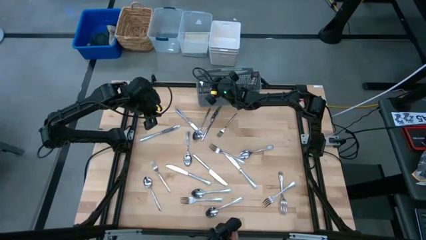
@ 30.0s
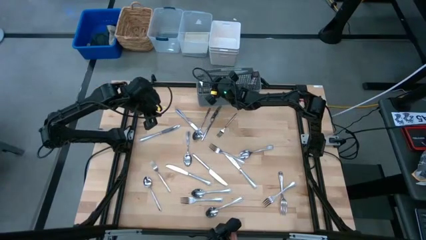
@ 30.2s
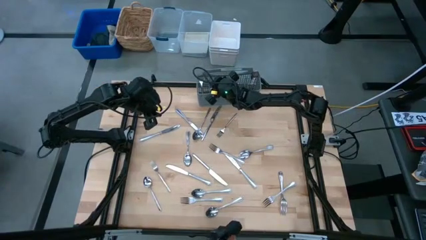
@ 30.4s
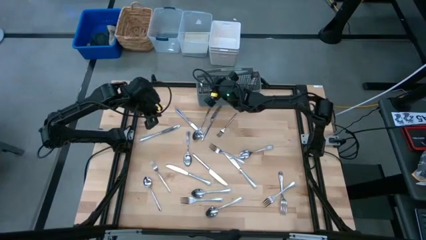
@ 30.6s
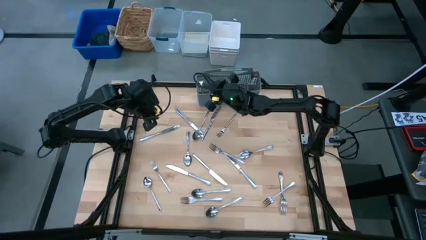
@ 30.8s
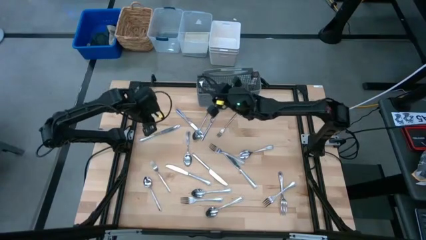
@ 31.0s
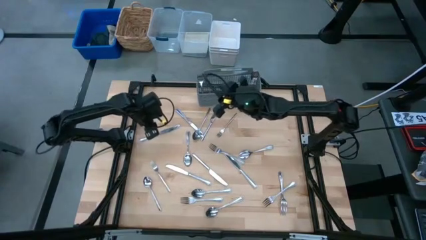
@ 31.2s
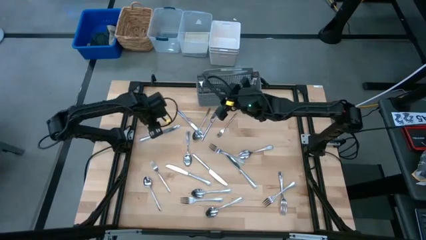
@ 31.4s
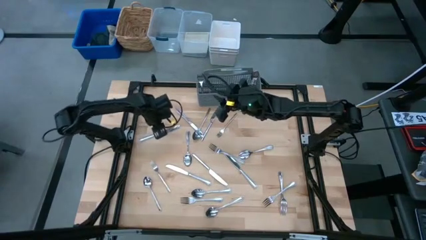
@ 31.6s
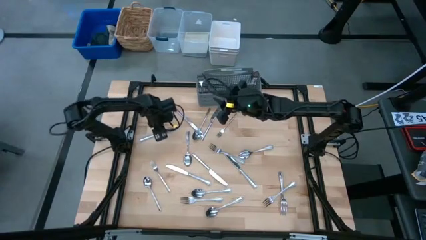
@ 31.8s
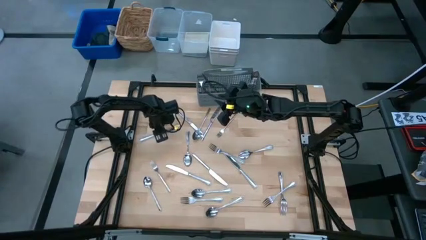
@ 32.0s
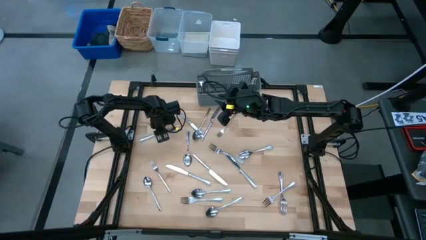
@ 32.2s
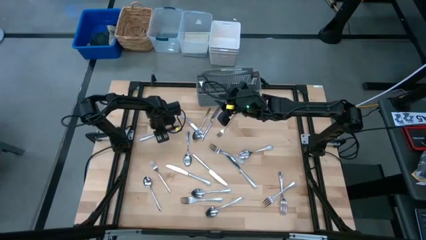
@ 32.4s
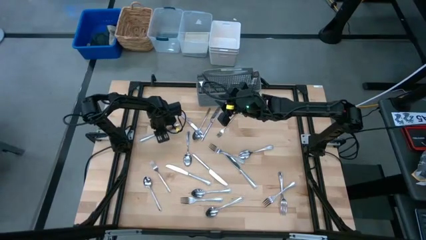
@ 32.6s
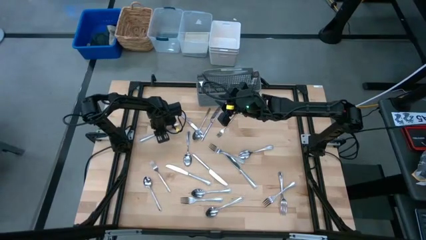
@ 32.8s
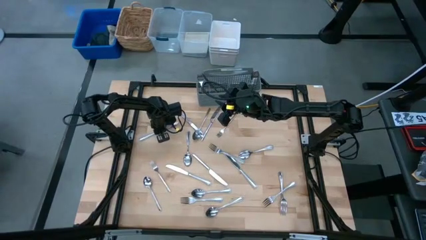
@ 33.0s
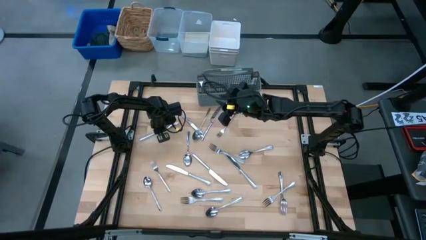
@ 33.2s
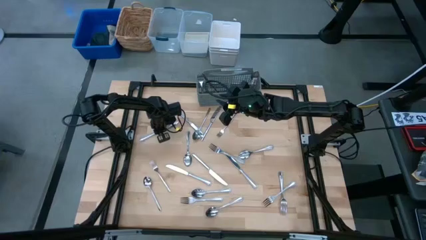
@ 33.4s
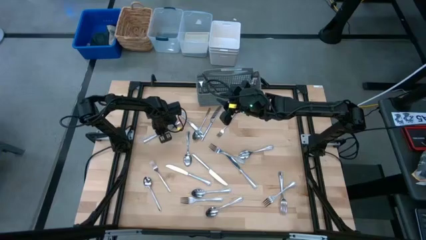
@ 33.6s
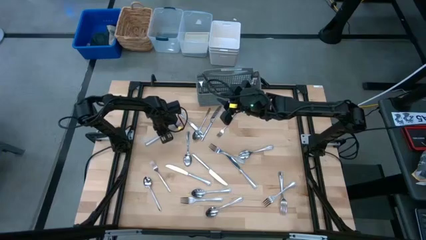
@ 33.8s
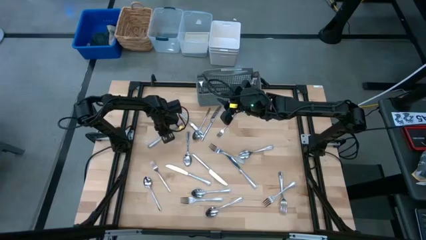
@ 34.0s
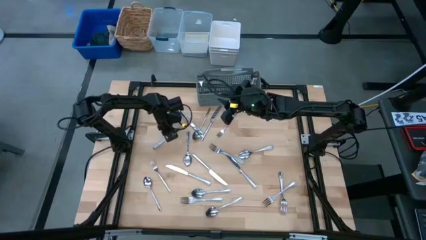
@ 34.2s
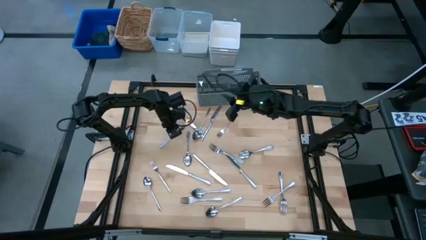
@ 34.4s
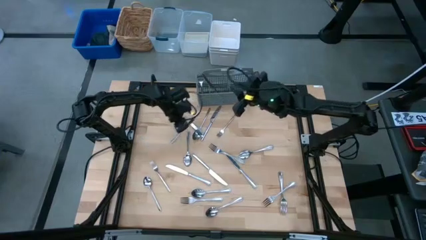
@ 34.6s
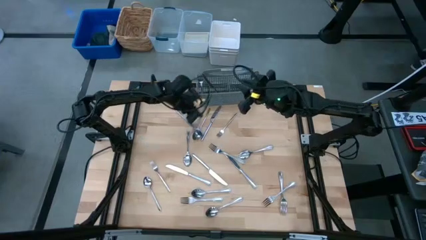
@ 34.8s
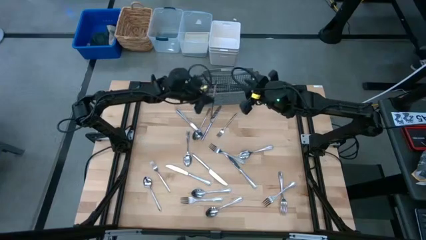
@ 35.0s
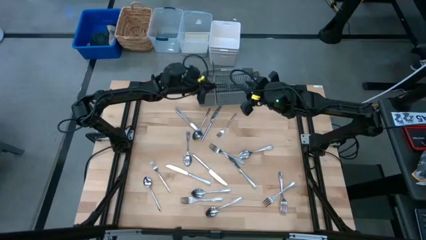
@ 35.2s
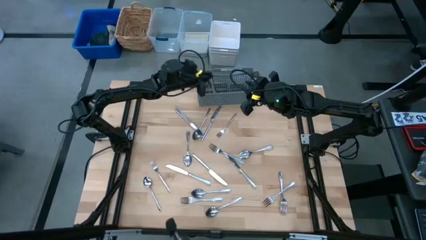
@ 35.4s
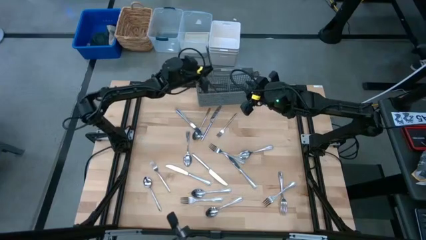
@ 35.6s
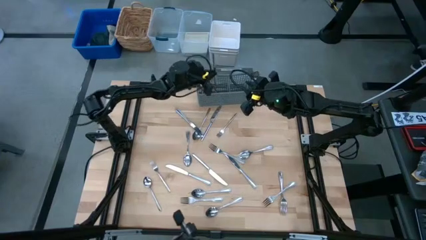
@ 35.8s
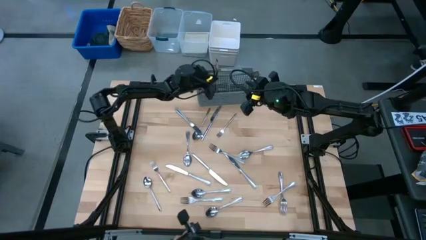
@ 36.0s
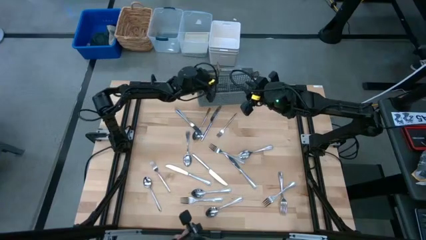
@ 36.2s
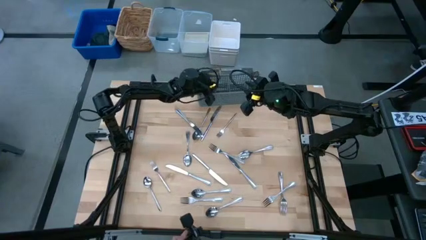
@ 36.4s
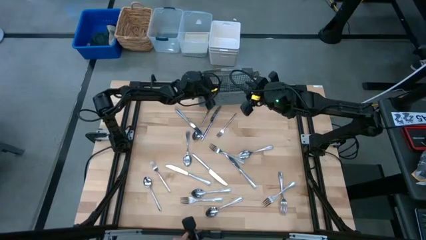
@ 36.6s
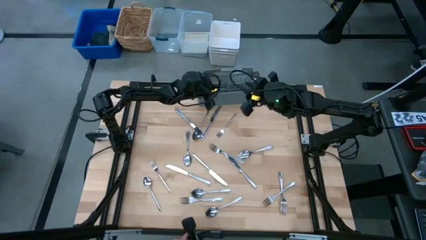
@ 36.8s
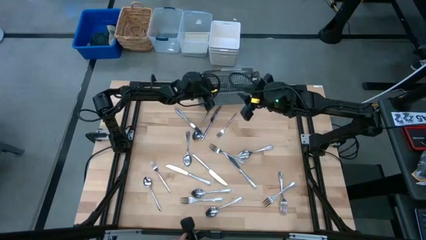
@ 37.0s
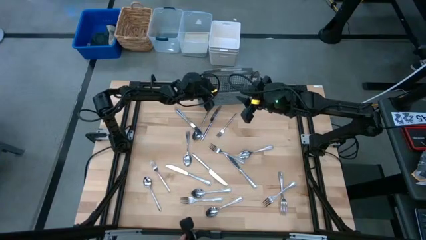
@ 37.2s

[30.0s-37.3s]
Put the silver knife into the dishwasher utensil holder

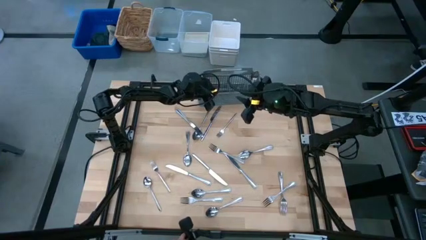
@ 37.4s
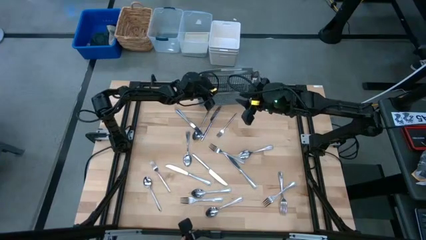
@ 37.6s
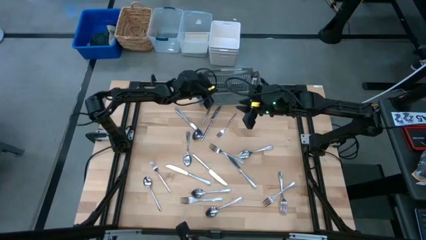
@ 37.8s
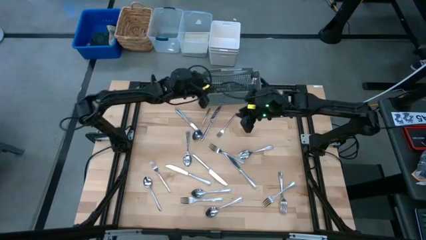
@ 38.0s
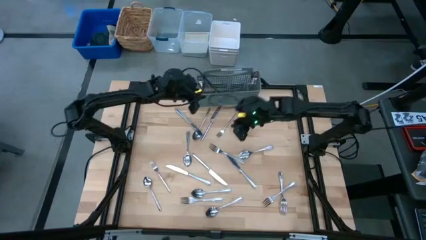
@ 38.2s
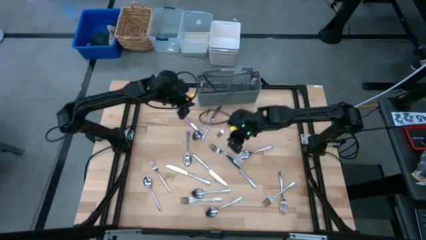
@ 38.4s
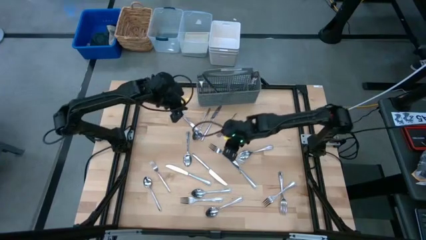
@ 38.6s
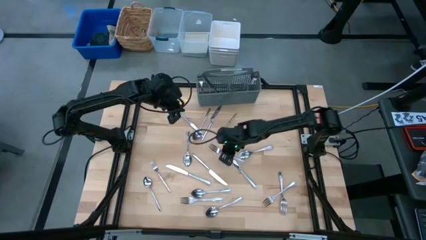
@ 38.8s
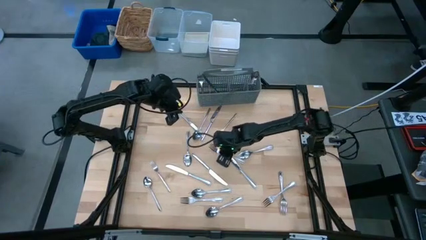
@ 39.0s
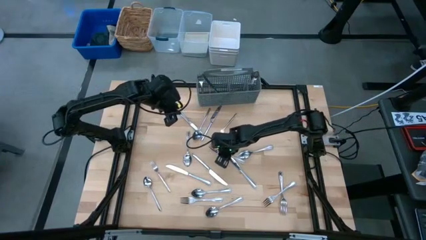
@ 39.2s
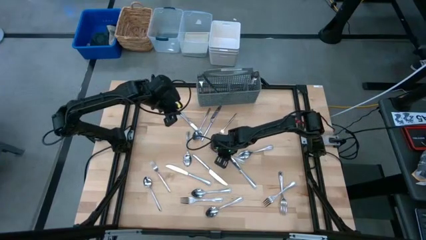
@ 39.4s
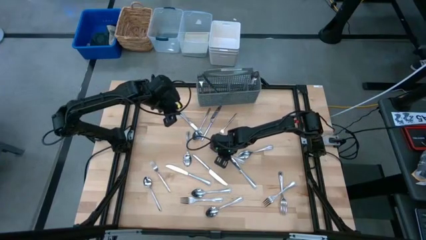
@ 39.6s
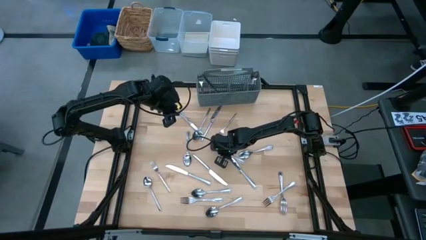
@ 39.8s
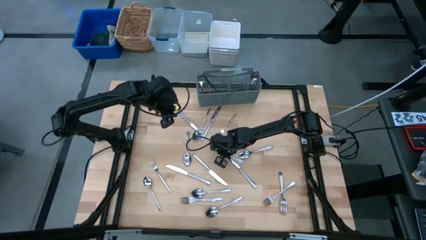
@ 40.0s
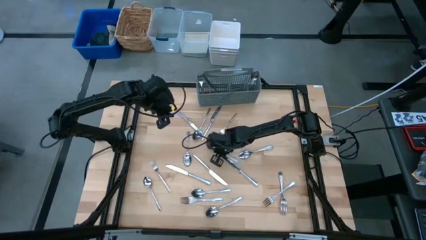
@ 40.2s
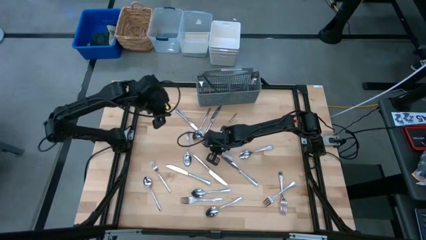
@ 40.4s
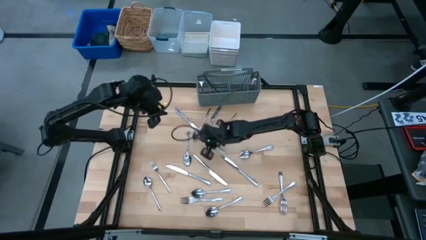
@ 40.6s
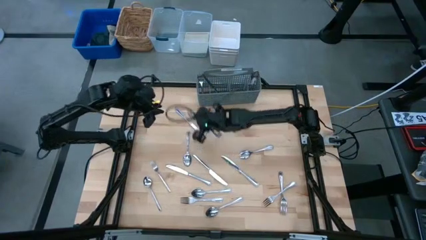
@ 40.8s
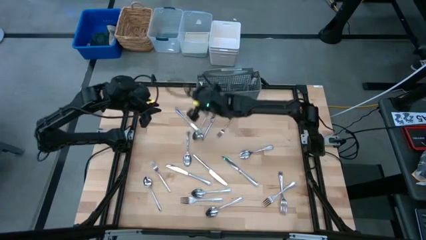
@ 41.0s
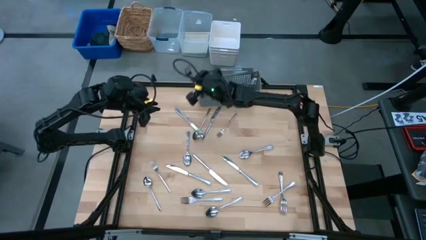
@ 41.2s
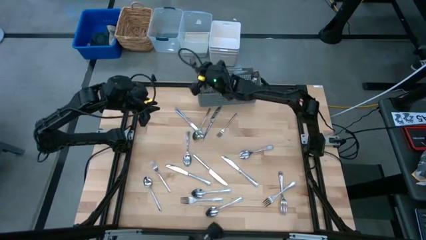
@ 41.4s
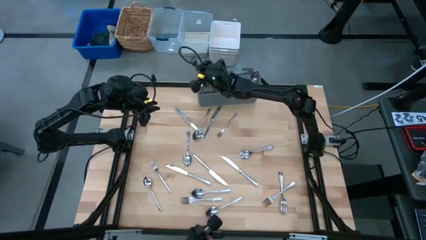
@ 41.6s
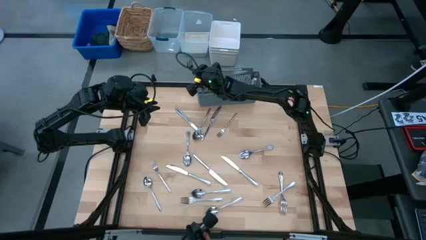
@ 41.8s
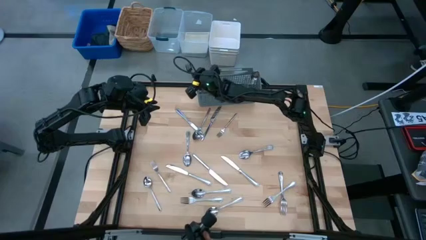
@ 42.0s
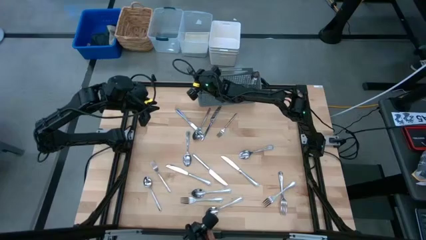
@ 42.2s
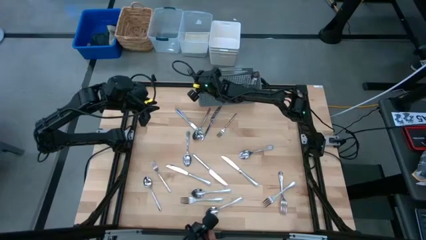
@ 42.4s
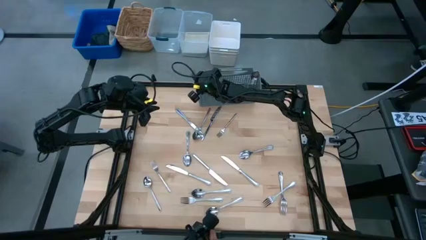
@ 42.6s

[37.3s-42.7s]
Put the silver center fork into the dishwasher utensil holder

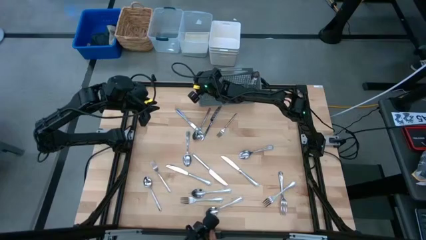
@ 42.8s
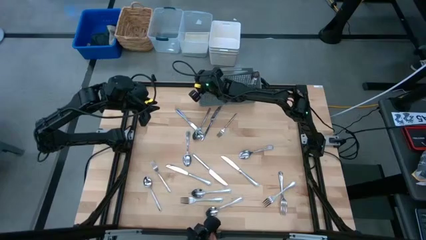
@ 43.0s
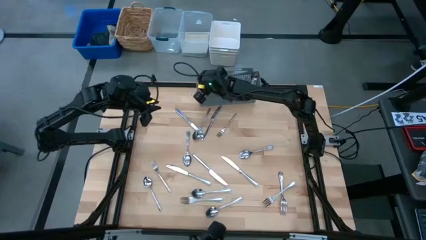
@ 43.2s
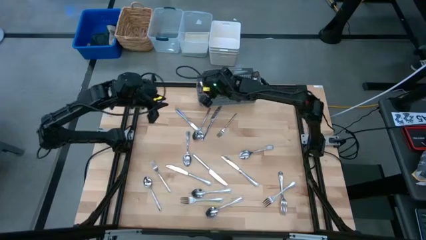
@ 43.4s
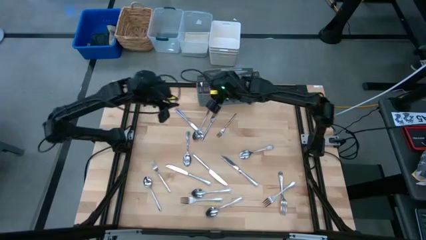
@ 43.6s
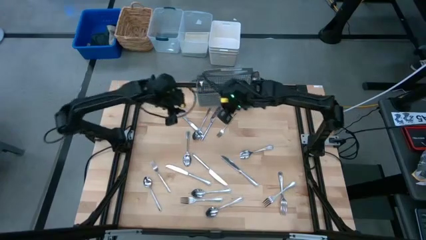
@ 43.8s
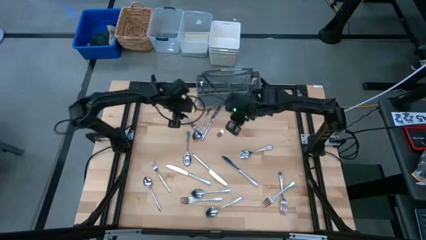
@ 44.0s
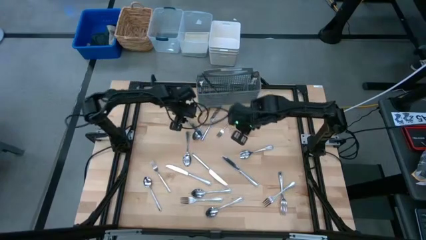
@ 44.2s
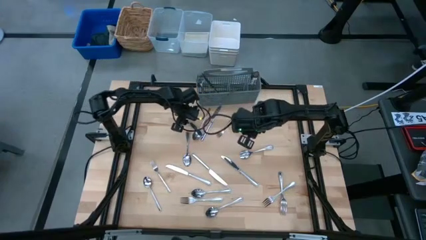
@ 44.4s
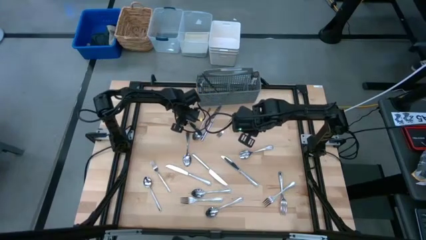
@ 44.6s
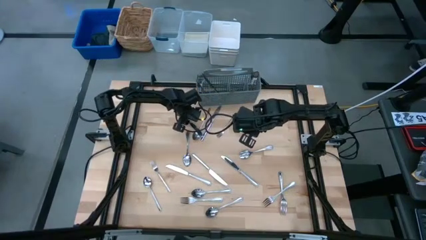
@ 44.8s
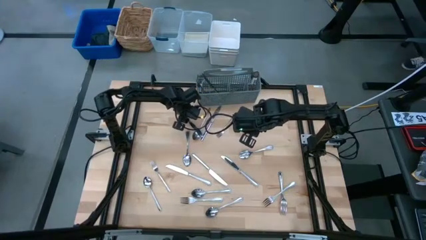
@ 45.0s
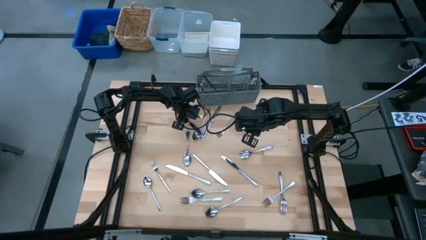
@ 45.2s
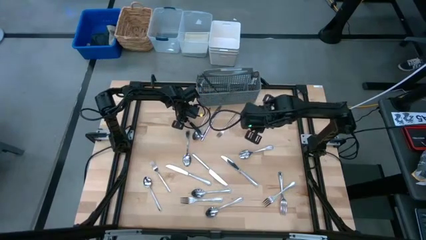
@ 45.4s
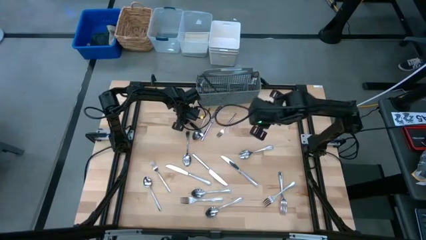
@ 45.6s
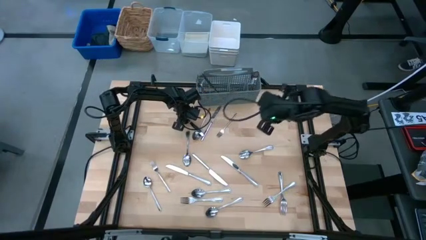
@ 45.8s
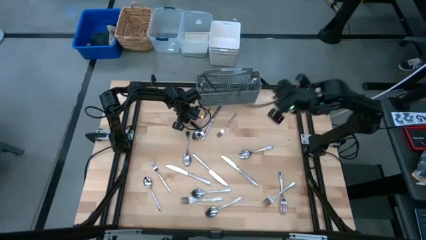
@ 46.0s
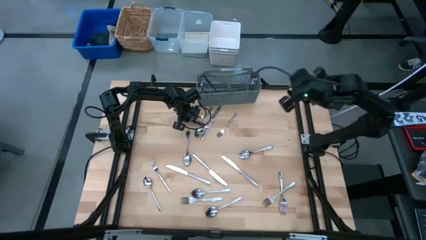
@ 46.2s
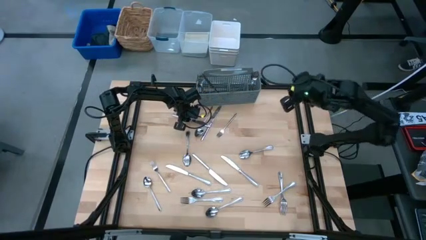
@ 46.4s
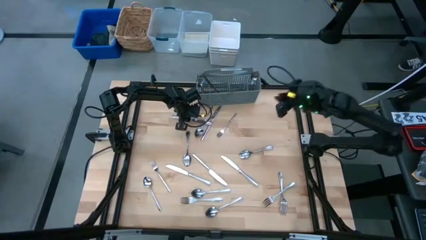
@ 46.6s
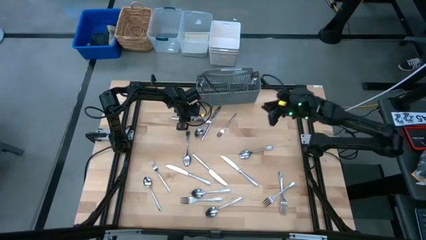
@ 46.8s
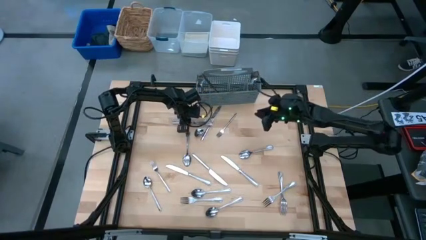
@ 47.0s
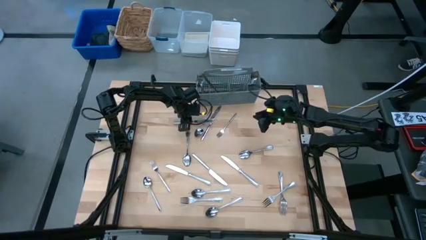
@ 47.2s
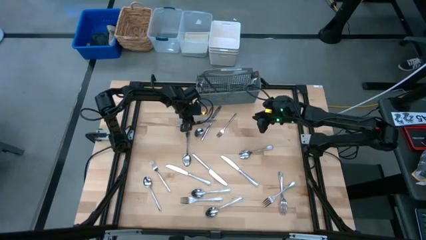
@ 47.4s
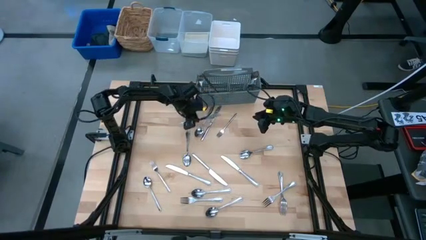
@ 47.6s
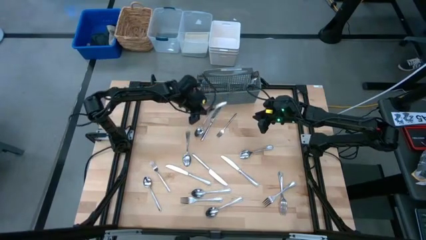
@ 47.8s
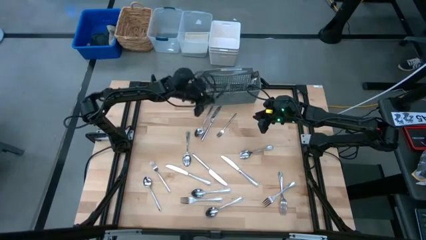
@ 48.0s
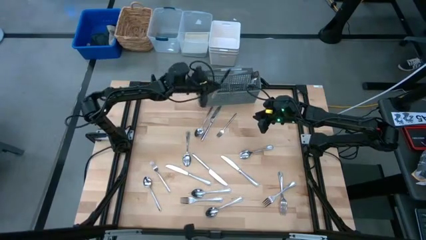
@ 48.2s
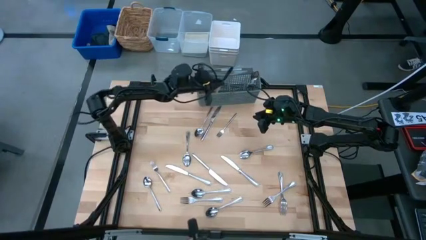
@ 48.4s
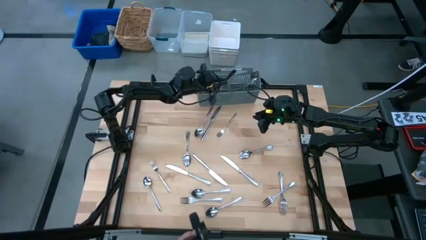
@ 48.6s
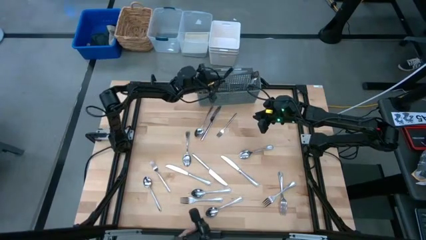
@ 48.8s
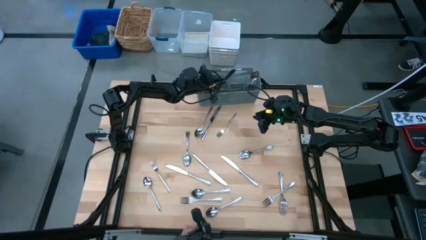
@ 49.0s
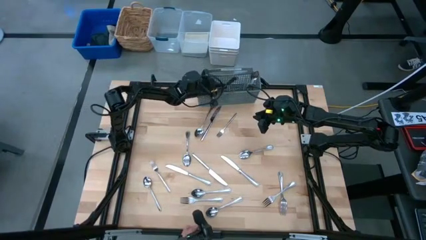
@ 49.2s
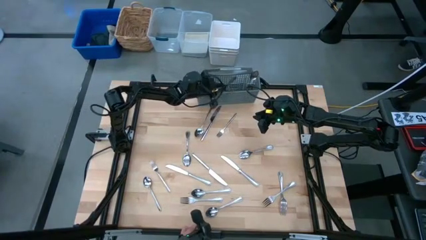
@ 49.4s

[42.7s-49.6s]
Put the silver knife into the dishwasher utensil holder
